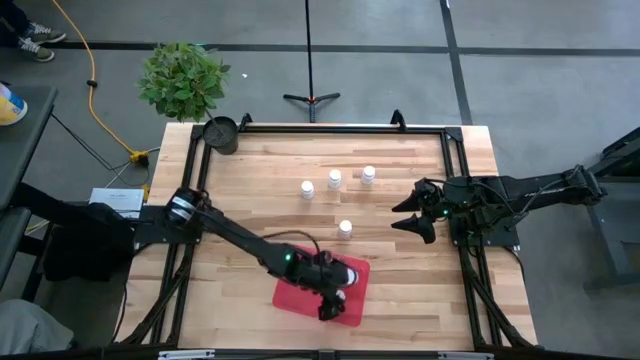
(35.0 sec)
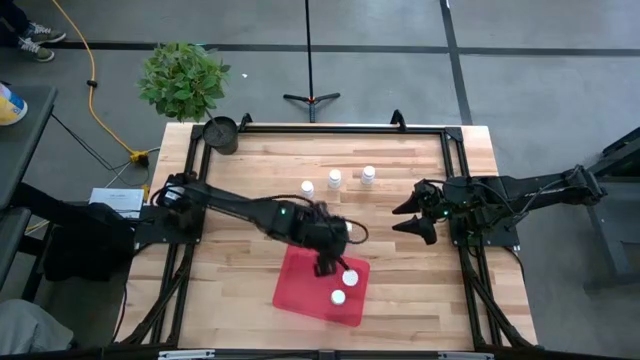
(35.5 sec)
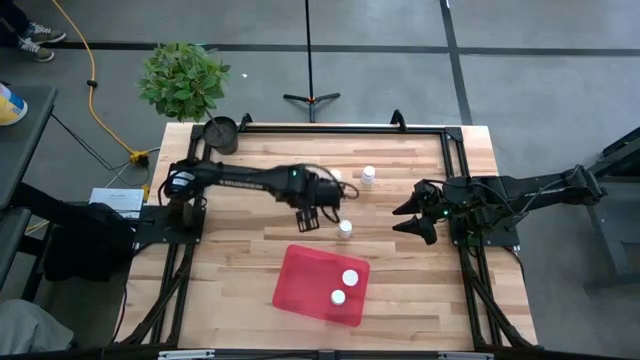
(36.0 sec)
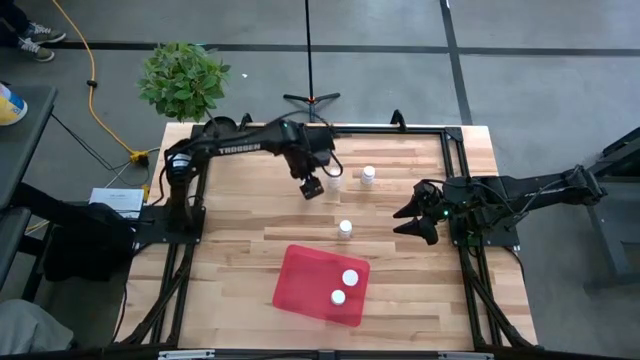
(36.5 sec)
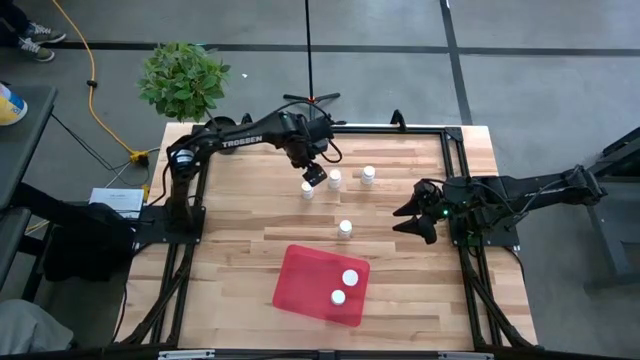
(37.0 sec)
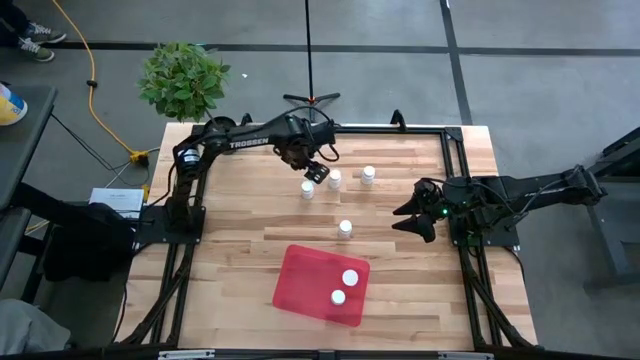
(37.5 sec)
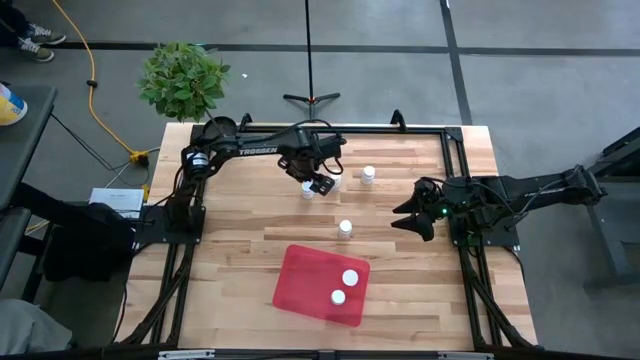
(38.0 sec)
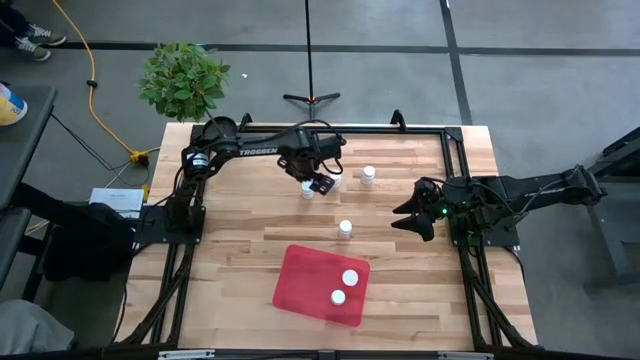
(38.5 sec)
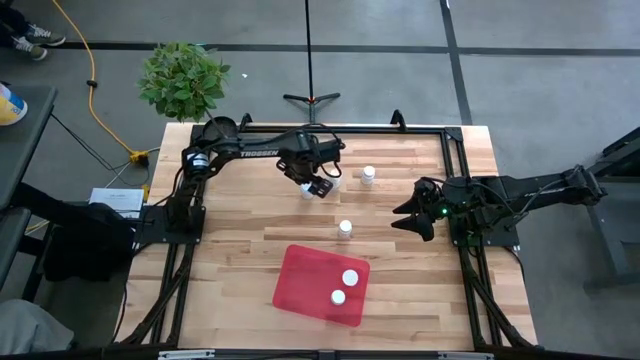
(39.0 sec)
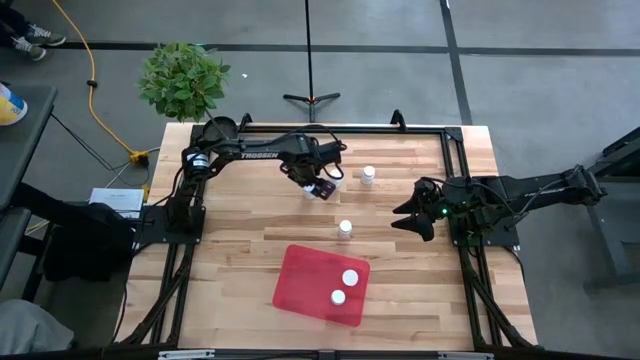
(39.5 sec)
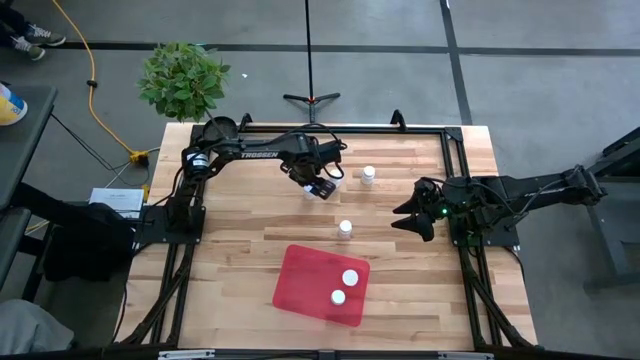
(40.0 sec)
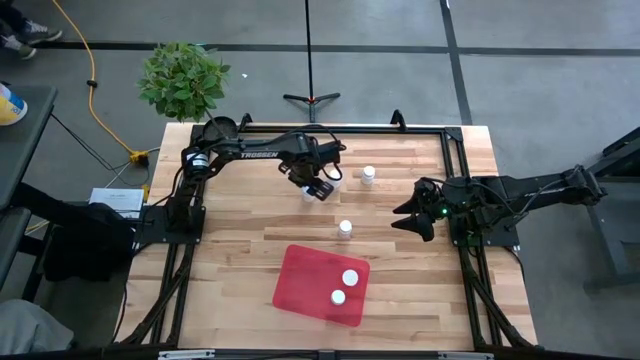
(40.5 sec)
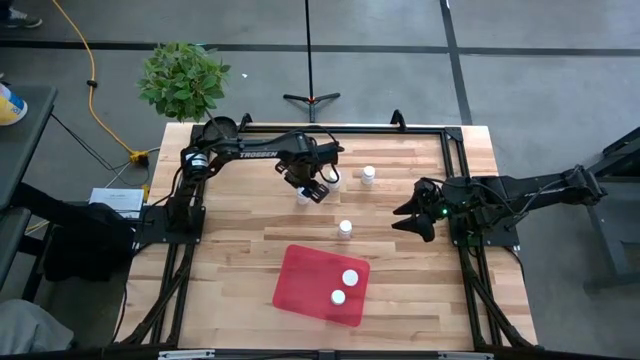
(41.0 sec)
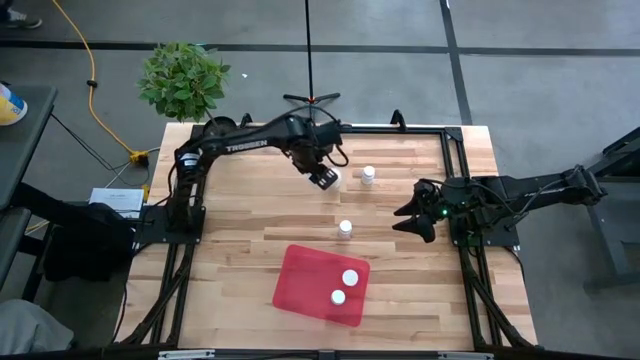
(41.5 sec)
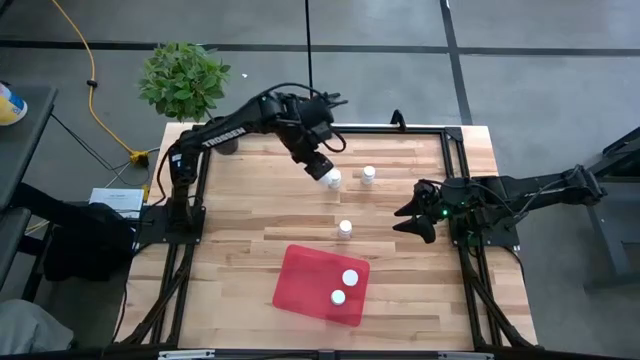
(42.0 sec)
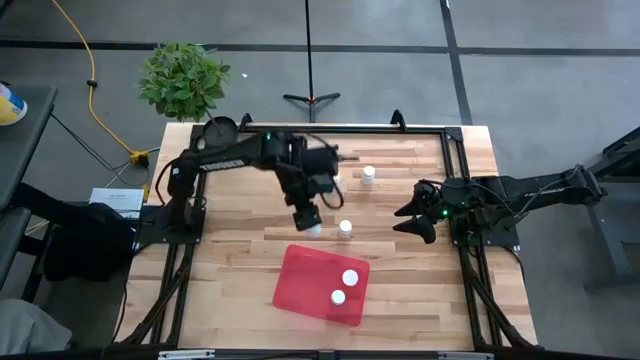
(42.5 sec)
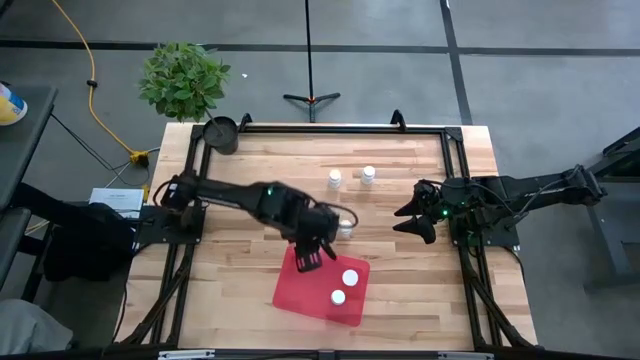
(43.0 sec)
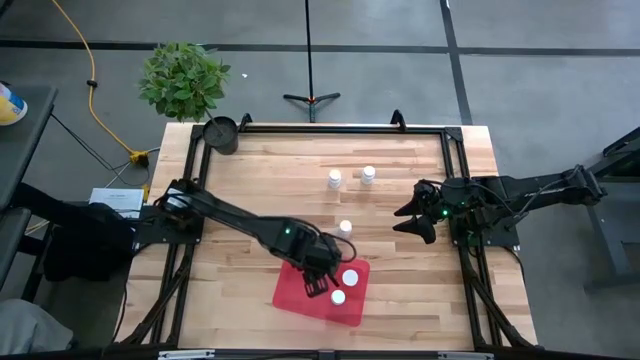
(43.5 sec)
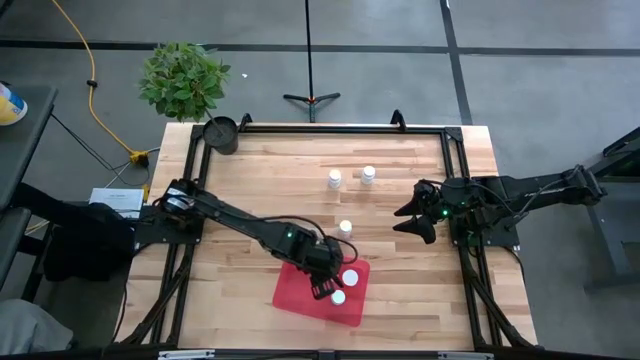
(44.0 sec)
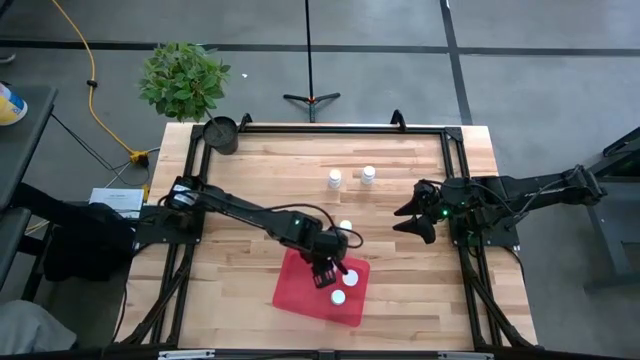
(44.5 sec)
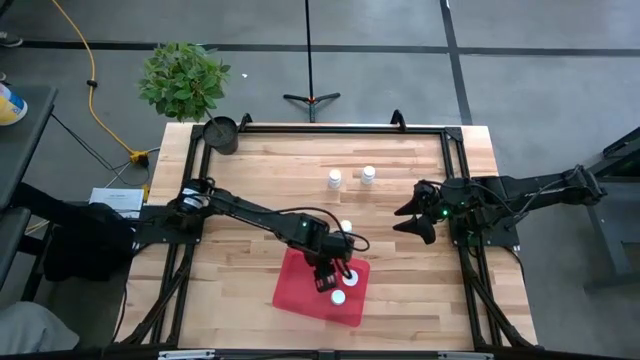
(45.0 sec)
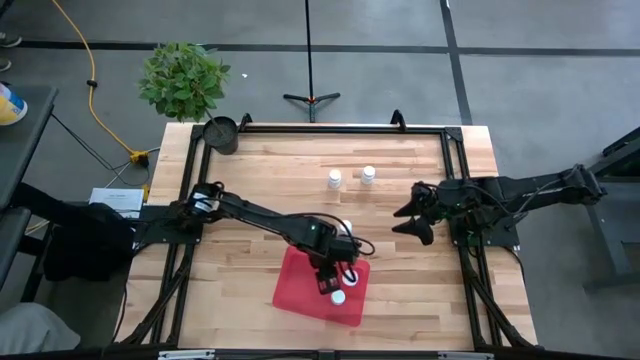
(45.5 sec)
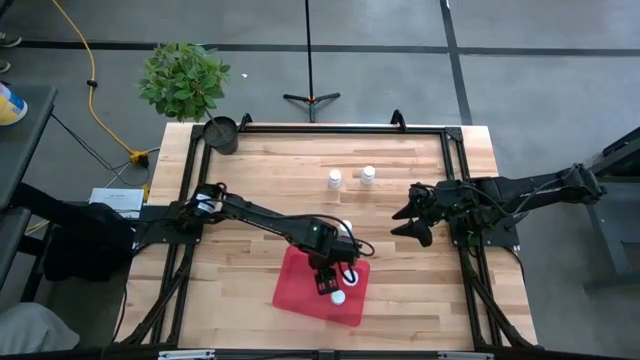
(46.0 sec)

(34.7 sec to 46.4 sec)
Task: Pick and place pill bottles into a basket
Put the white medicine bottle into the red container

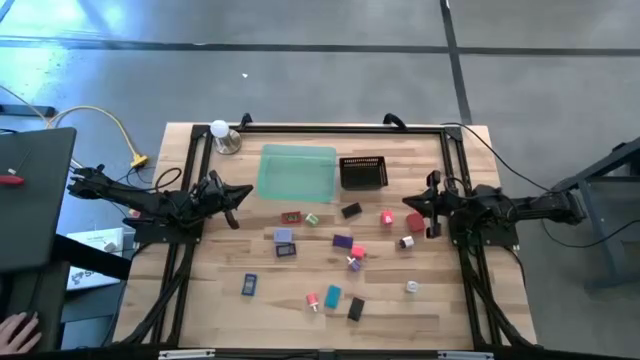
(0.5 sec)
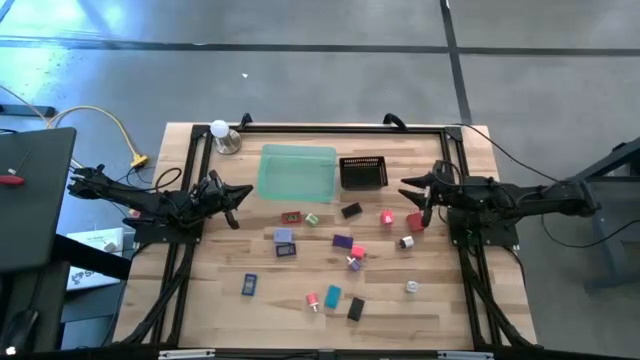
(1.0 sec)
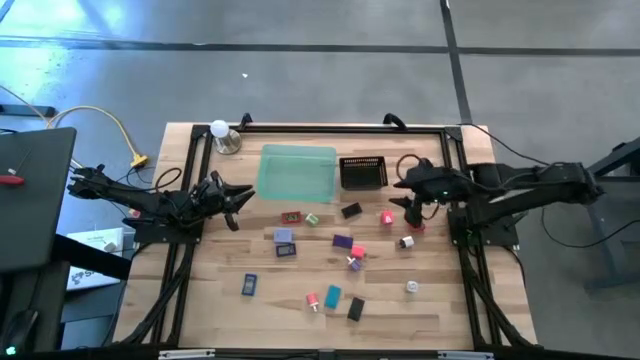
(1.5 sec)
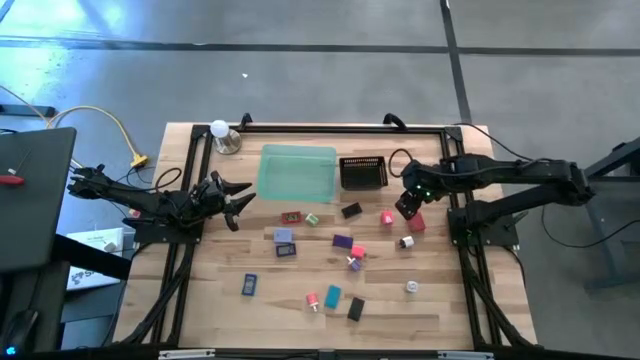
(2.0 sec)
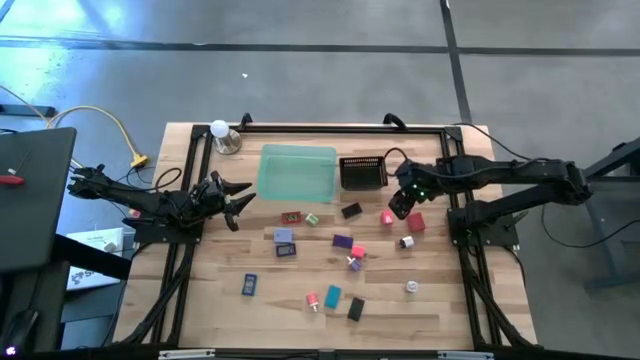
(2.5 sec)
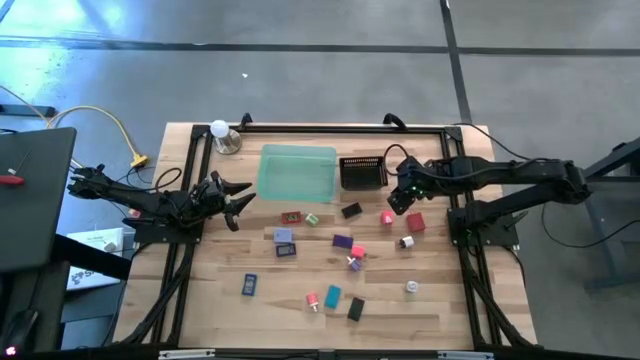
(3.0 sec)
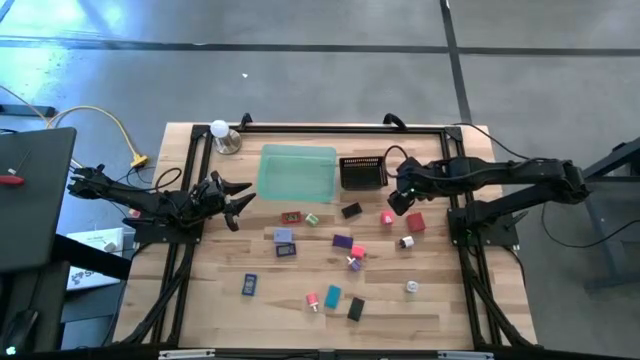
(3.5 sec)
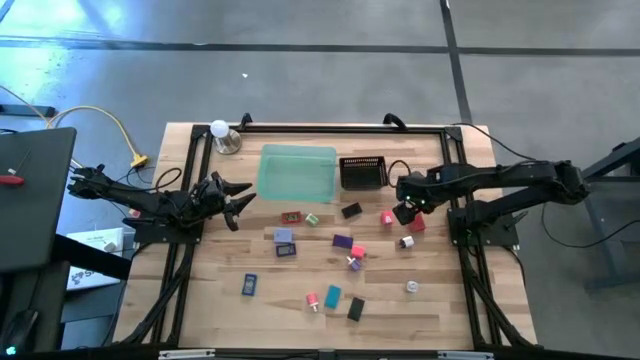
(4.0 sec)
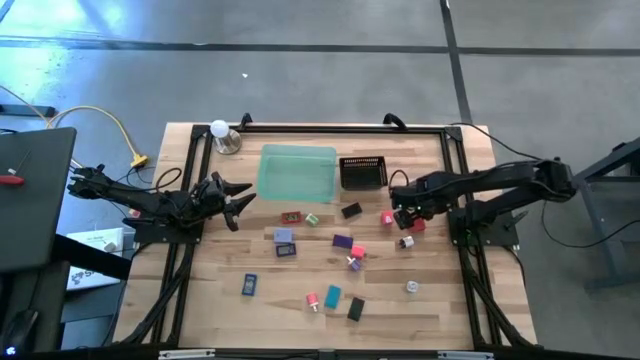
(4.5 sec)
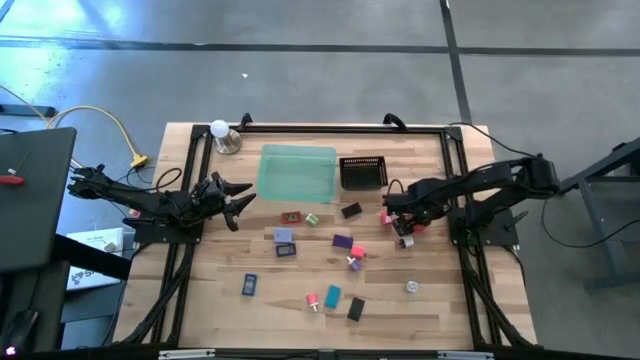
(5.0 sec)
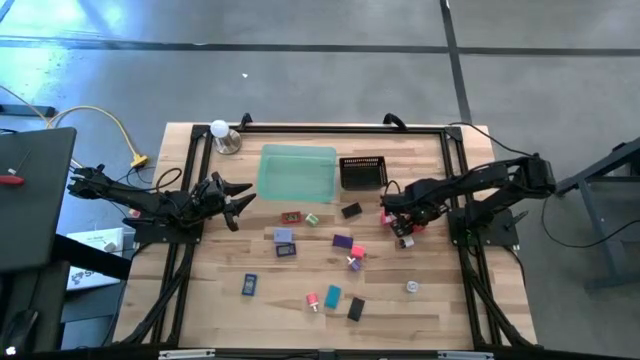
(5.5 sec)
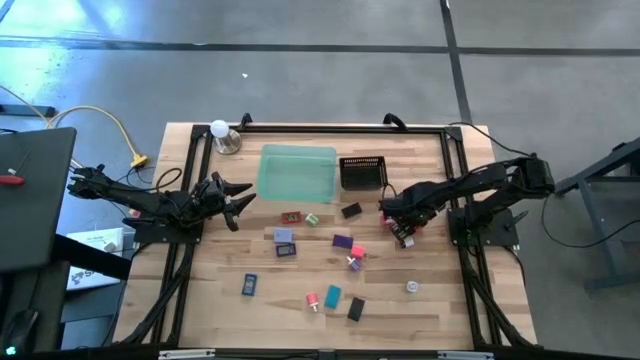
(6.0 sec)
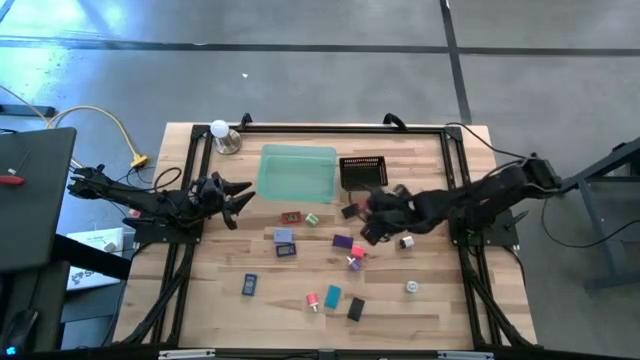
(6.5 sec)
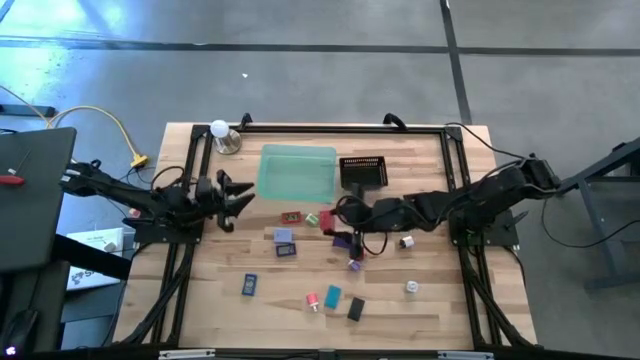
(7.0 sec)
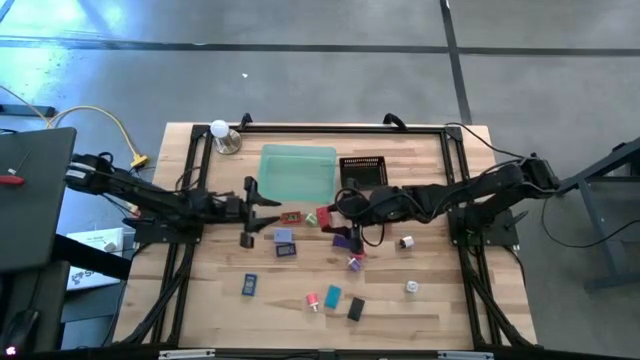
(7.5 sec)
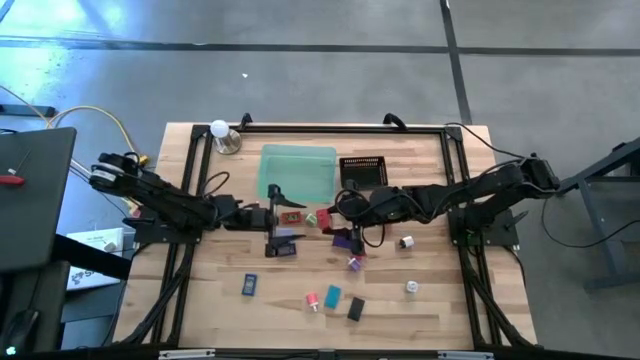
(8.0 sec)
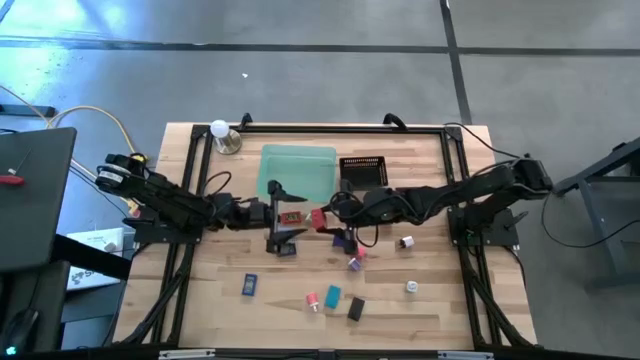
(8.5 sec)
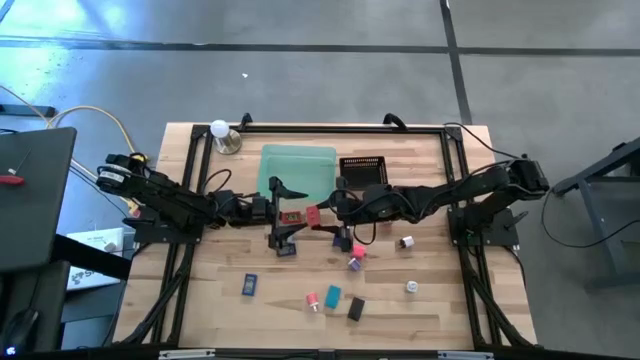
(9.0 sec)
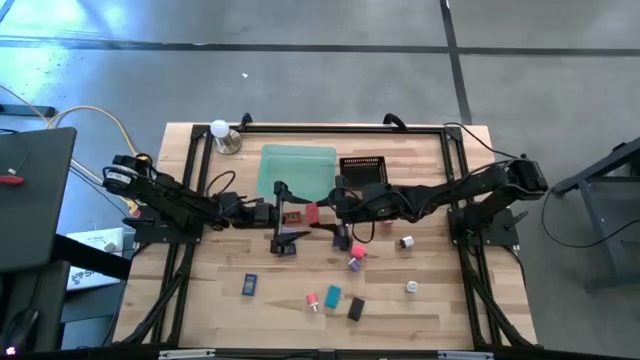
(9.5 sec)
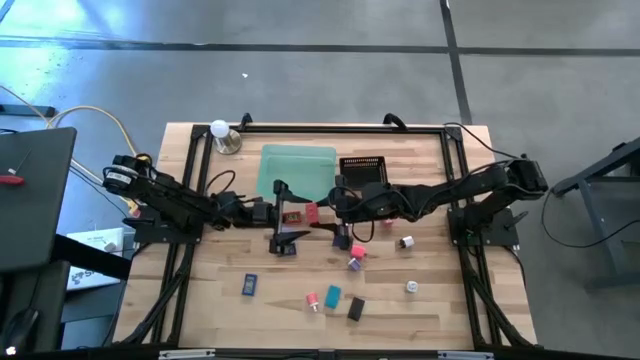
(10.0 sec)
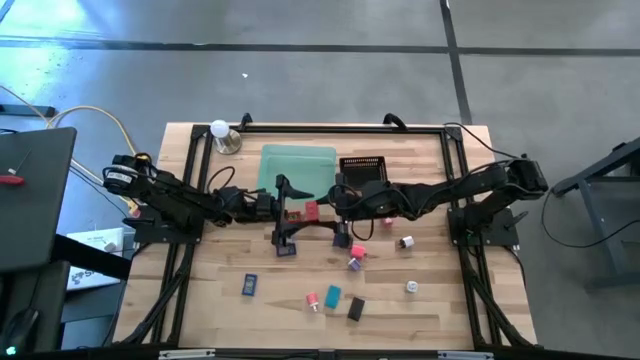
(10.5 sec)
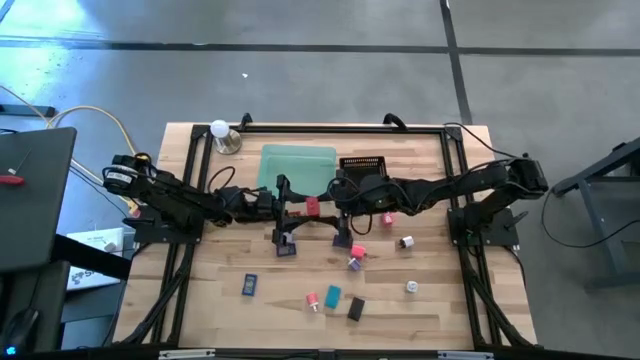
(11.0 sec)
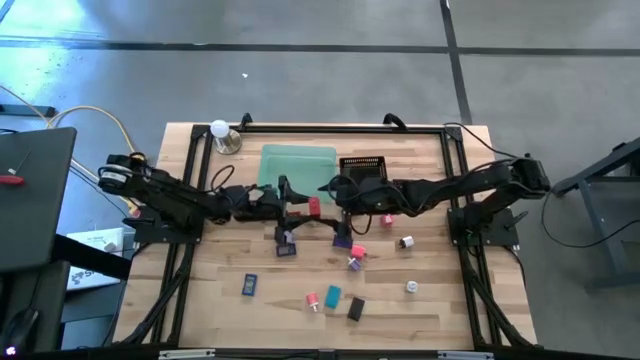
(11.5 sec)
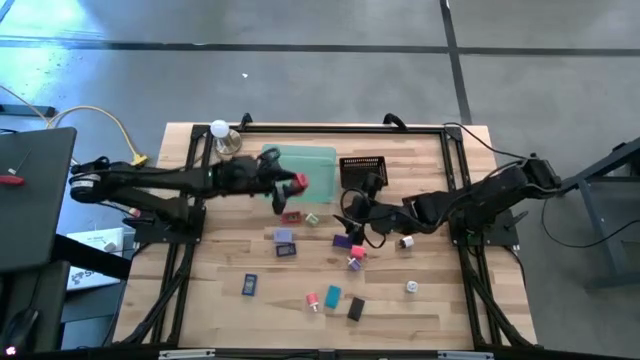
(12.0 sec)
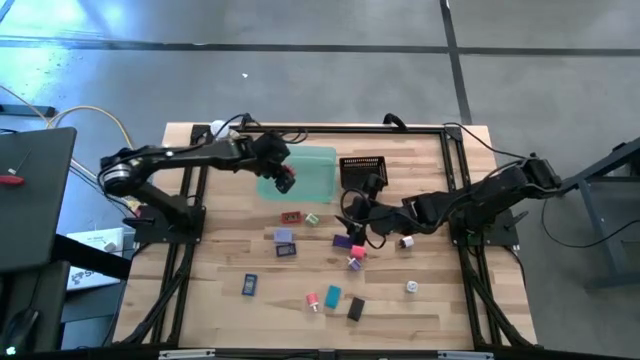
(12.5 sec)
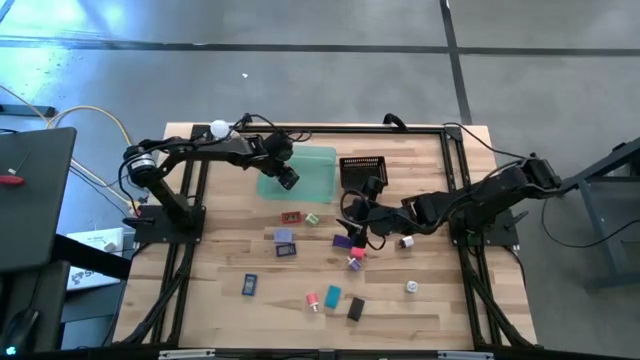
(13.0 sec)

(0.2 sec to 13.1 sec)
Task: Pick & Place Office items
Put the red charger adapter into the green bin
